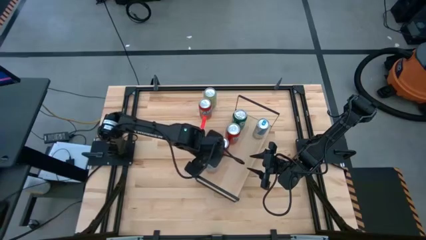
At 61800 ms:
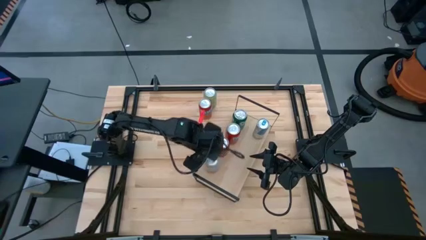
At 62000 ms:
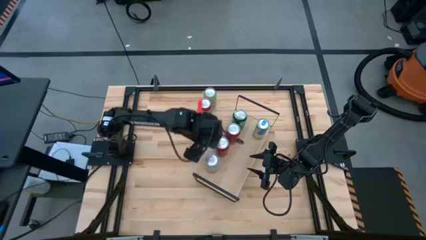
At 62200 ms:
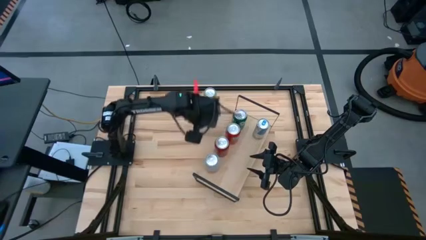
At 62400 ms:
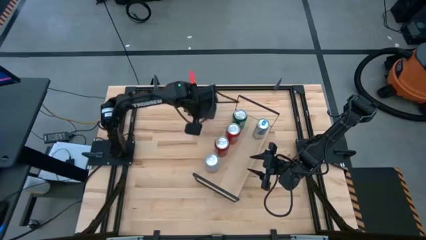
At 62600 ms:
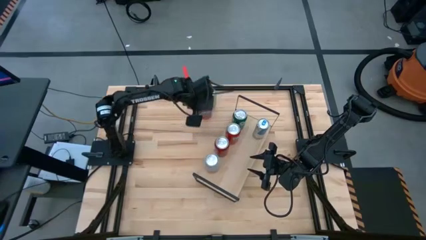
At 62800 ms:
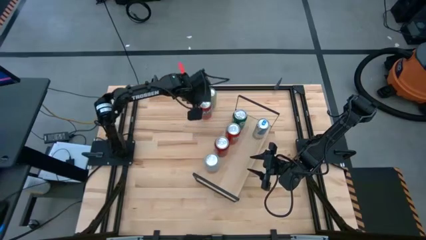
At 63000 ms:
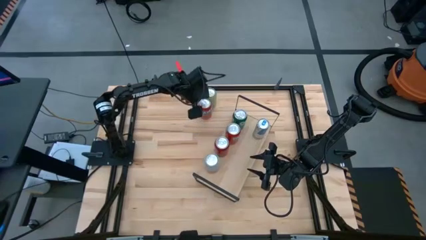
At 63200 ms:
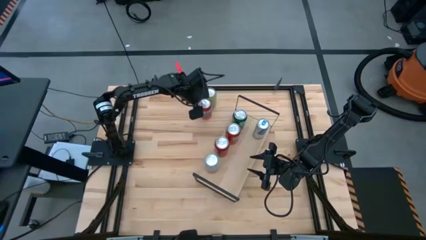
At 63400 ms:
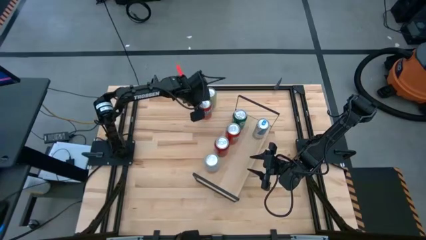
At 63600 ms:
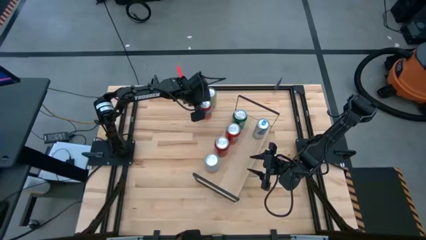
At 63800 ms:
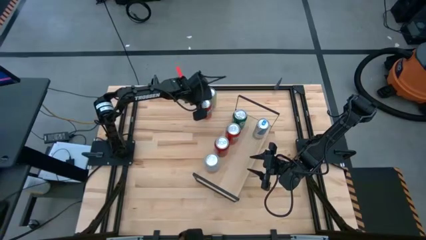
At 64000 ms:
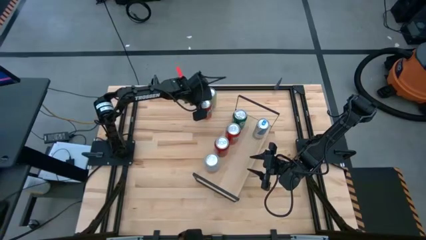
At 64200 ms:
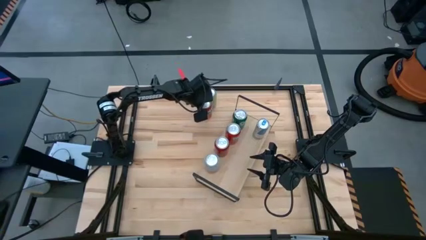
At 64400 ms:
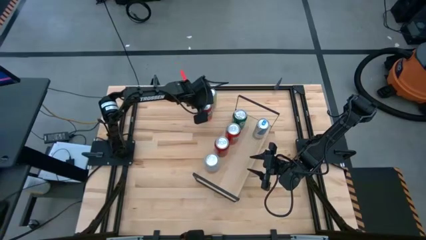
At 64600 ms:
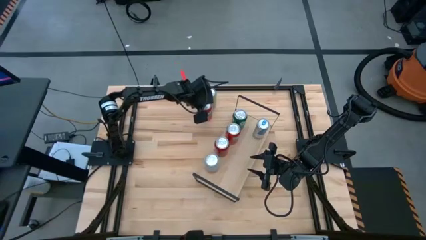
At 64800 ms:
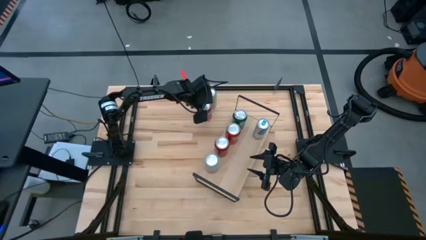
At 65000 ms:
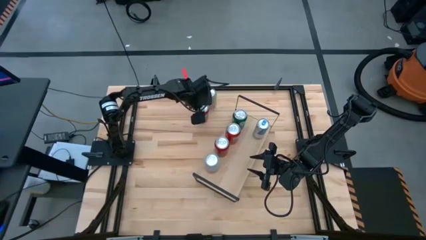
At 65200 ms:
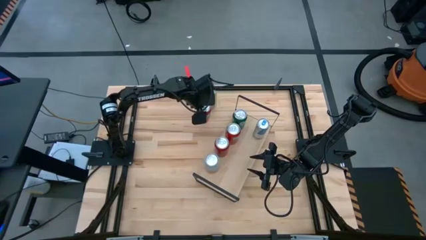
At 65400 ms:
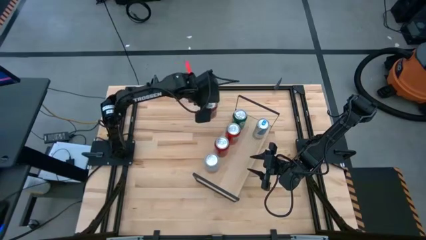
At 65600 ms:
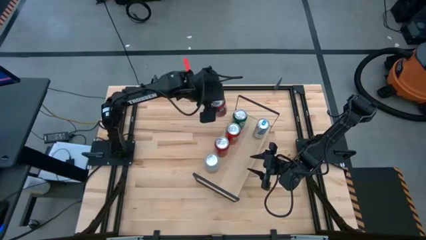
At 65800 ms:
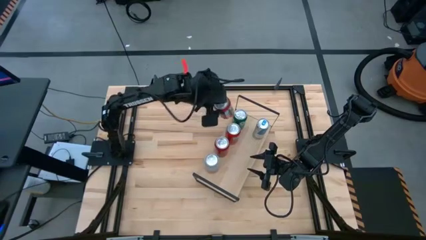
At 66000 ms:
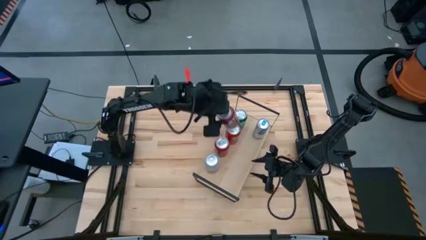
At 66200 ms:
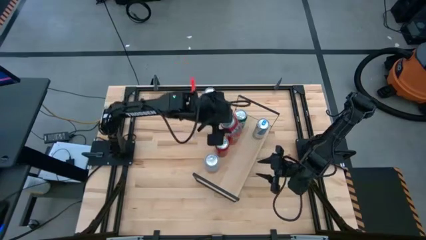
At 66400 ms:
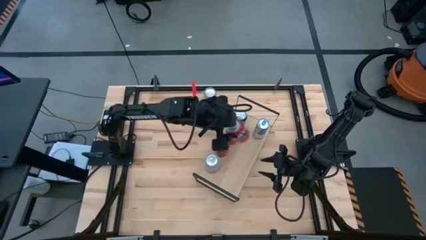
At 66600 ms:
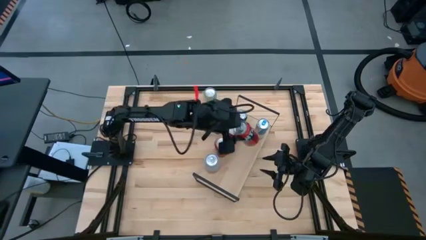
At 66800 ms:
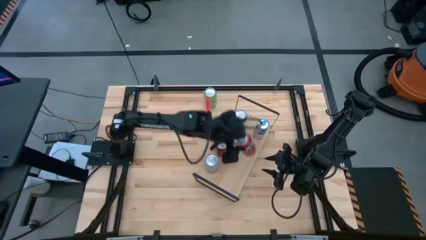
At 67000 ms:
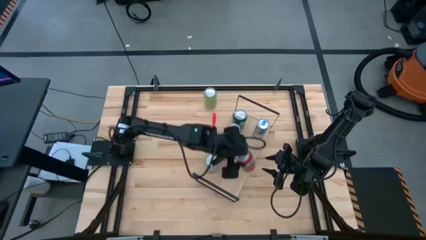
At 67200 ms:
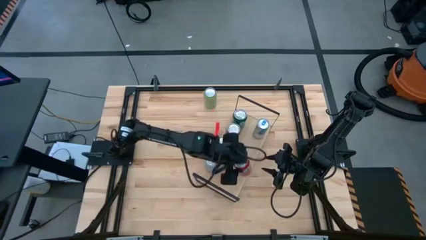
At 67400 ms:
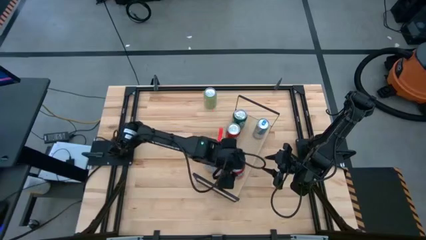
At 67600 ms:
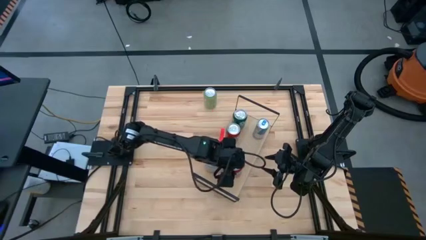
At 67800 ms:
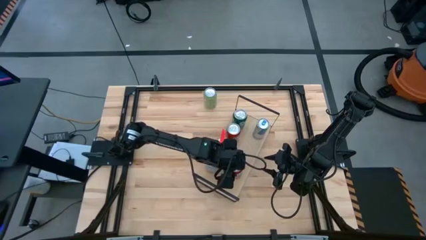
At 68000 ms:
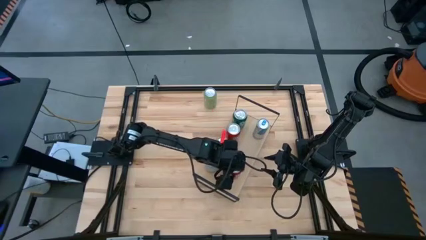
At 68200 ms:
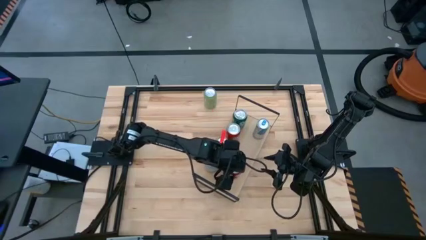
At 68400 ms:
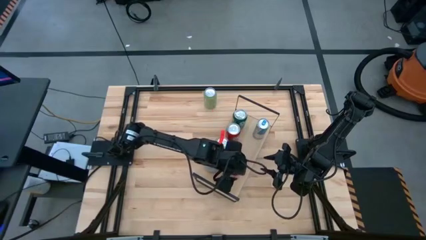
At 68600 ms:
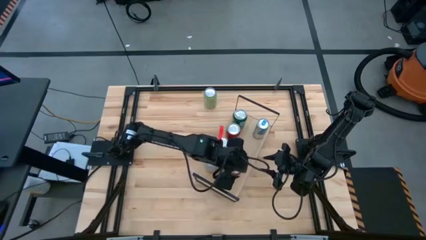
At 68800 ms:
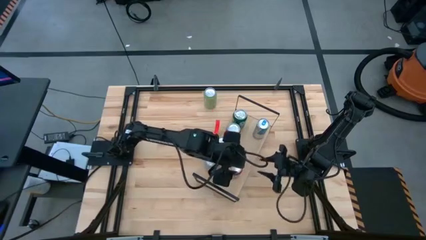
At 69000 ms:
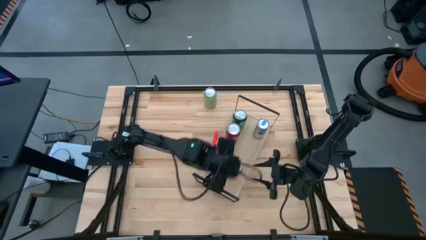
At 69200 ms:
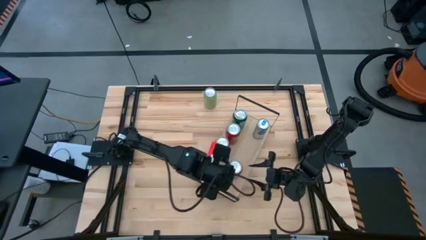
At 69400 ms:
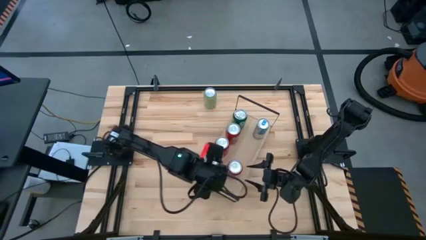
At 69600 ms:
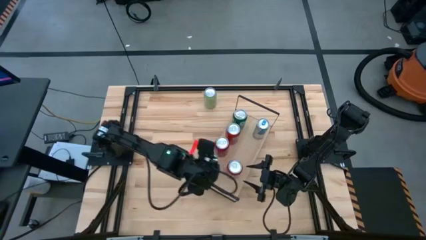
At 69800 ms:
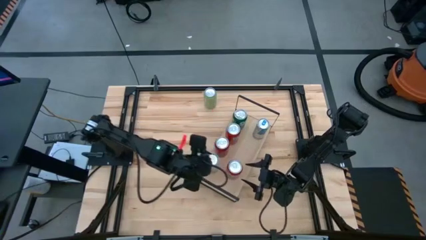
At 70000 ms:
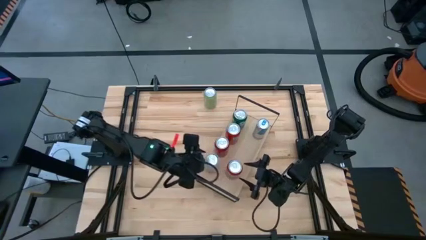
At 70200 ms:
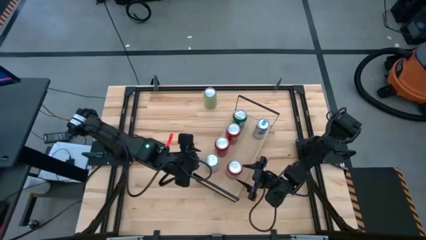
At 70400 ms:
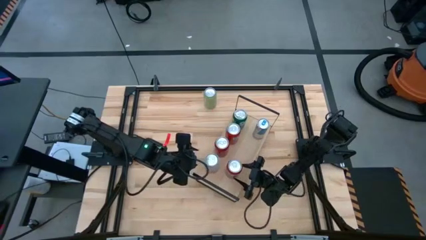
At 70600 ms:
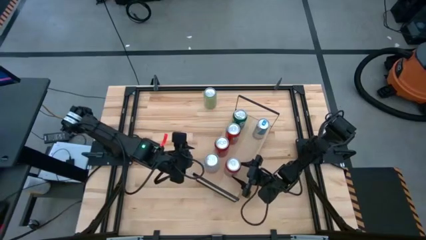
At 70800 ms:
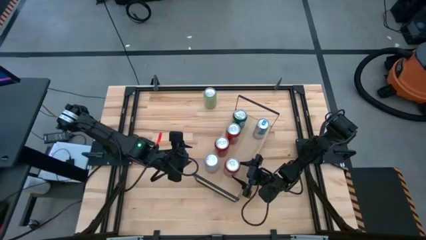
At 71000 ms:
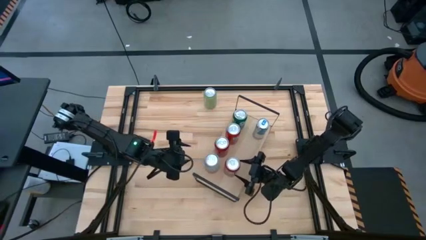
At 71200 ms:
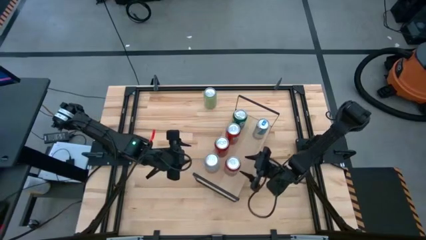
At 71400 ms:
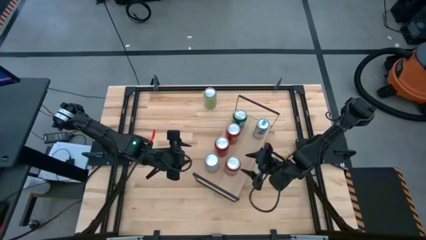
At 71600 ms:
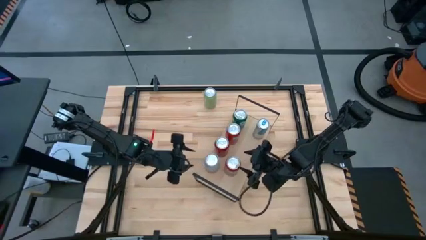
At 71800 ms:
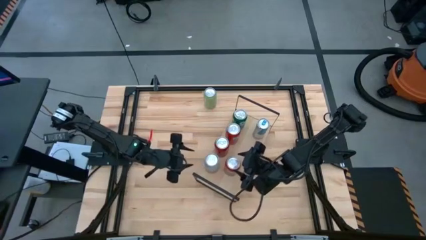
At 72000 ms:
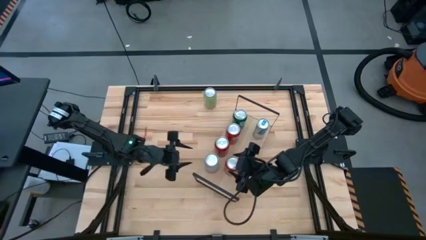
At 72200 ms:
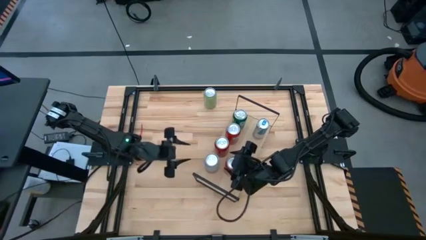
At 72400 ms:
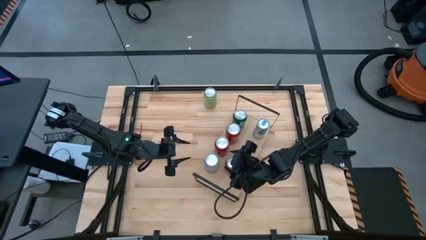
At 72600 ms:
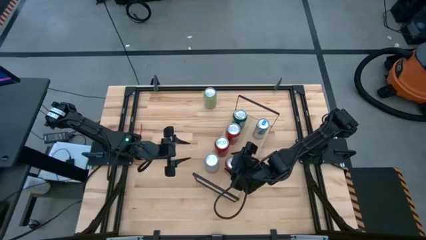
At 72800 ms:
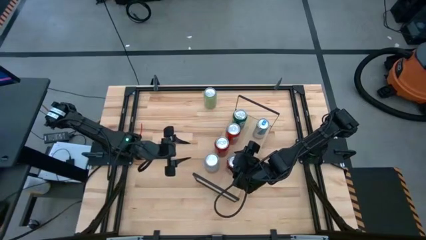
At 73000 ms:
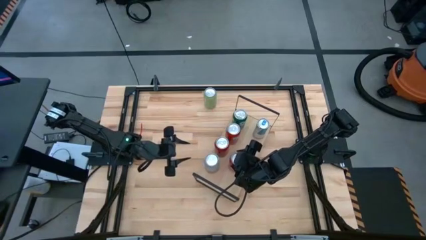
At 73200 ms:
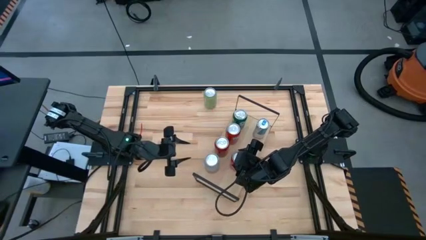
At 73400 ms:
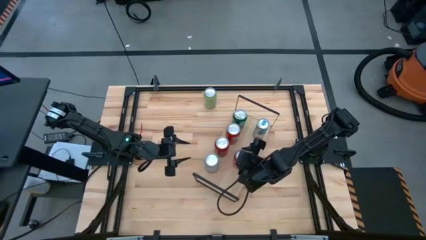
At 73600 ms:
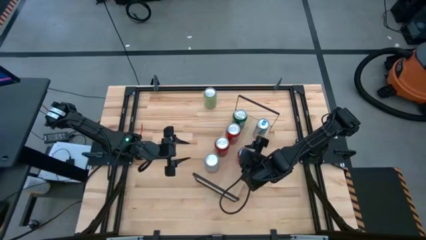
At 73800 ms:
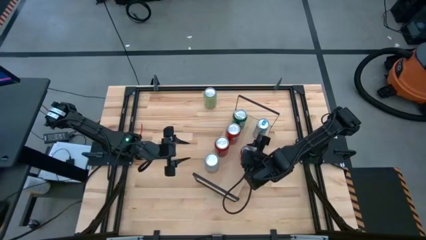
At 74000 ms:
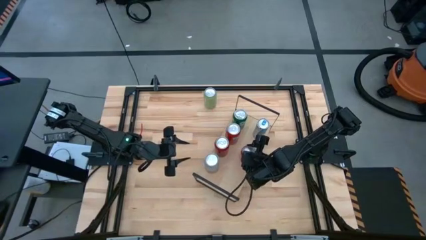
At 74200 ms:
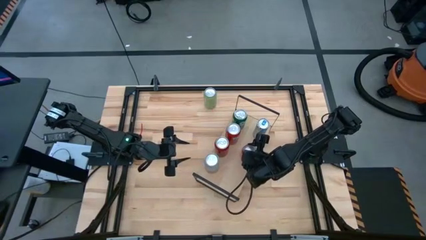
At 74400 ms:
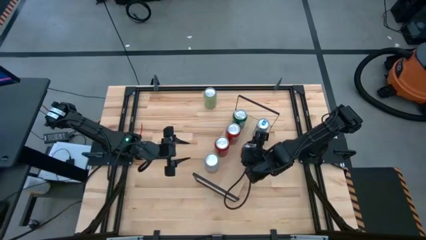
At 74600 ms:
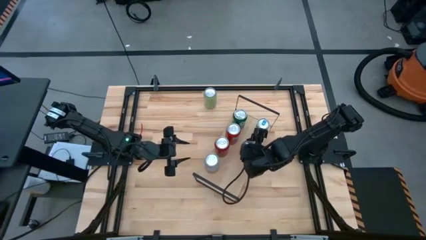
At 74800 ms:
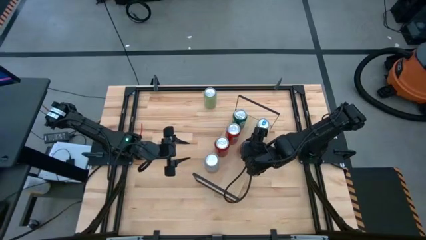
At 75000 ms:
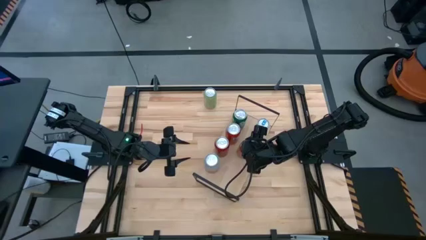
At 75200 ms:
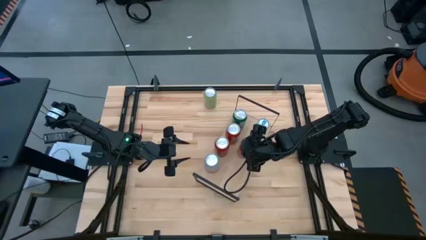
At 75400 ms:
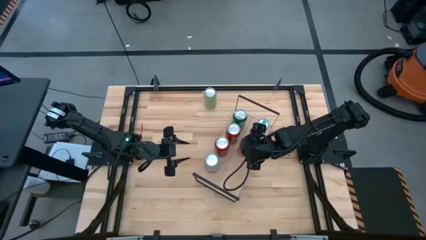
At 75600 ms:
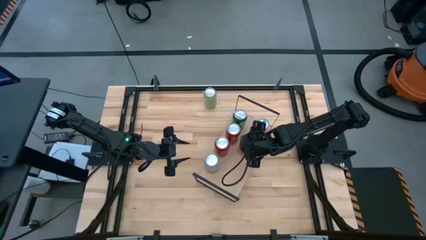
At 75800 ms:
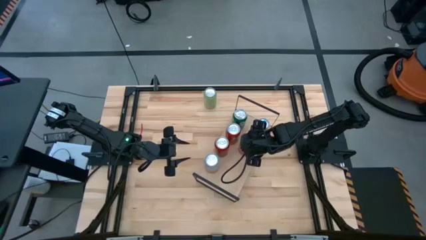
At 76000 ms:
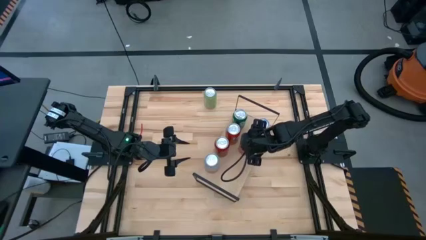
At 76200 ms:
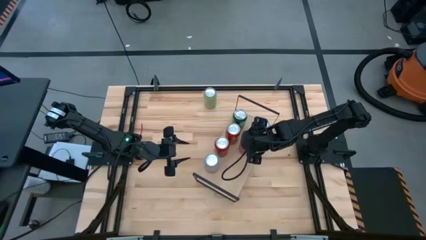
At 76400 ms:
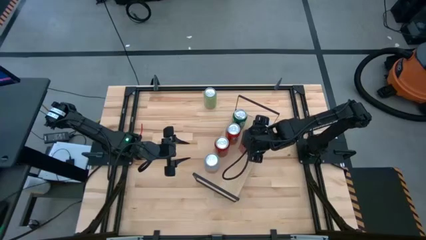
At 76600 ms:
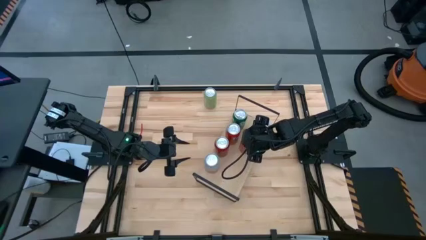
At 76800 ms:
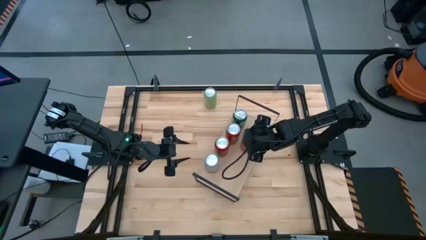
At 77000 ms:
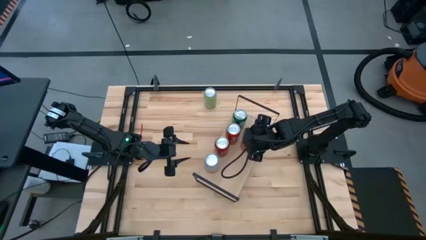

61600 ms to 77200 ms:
Task: Place canned beverage on shelf
Put the orange soda can on the shelf
